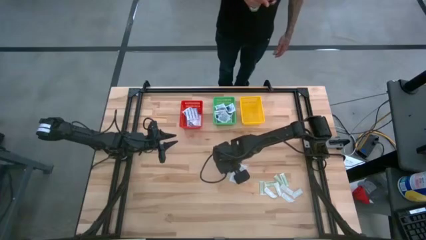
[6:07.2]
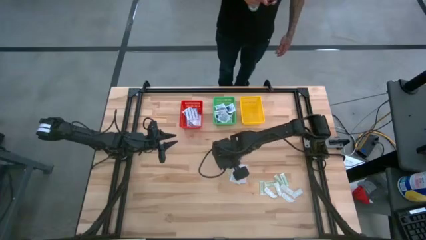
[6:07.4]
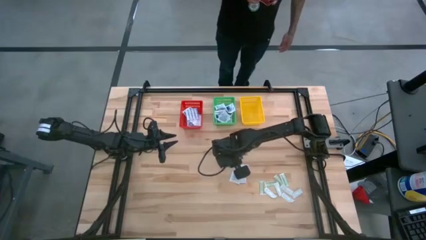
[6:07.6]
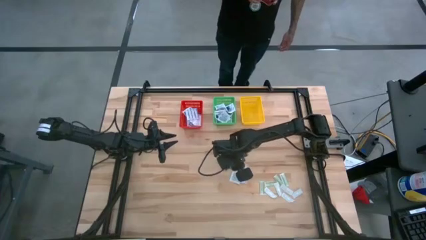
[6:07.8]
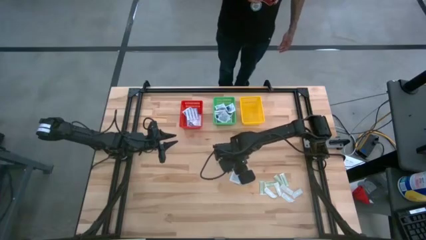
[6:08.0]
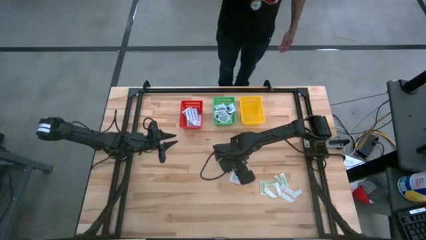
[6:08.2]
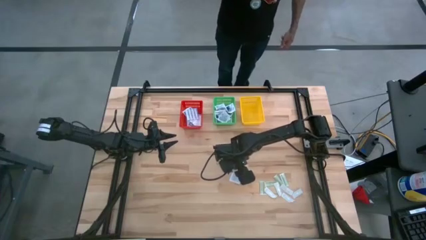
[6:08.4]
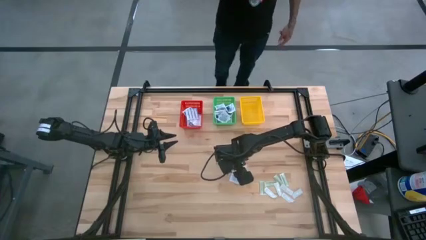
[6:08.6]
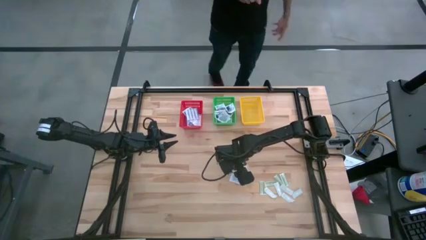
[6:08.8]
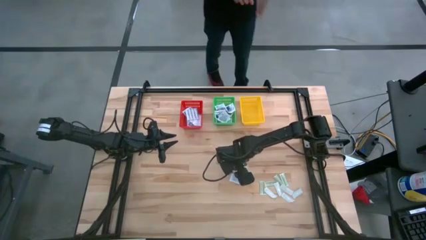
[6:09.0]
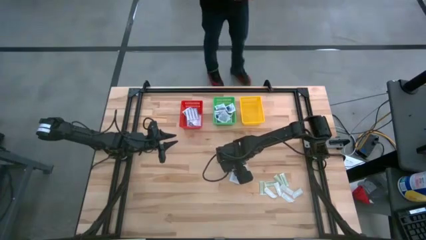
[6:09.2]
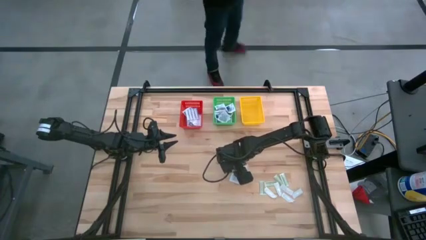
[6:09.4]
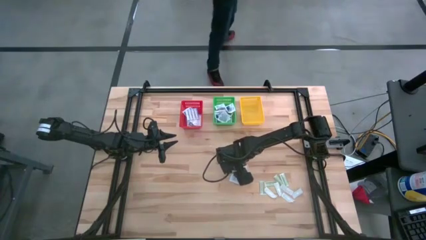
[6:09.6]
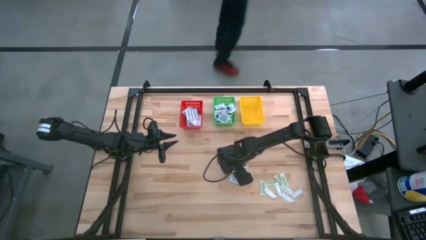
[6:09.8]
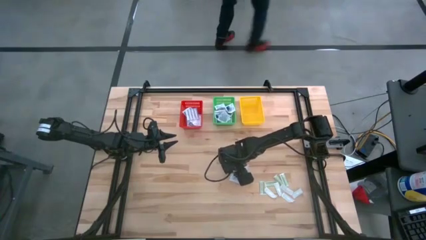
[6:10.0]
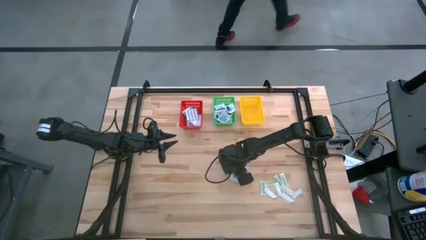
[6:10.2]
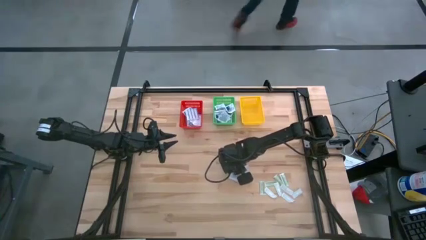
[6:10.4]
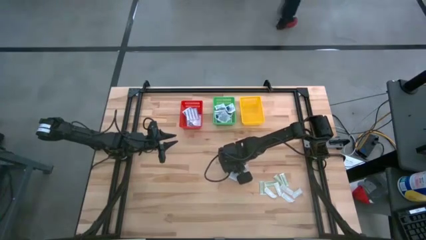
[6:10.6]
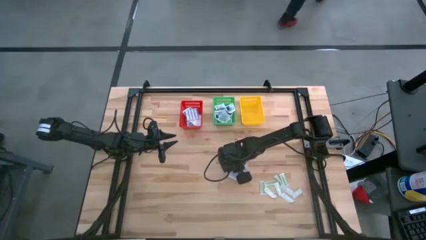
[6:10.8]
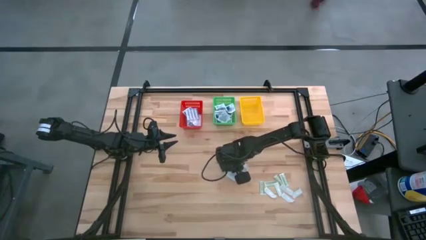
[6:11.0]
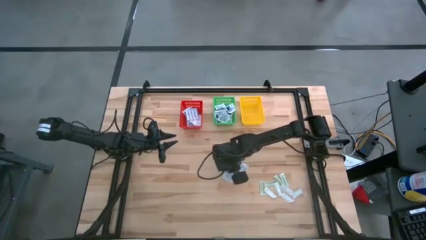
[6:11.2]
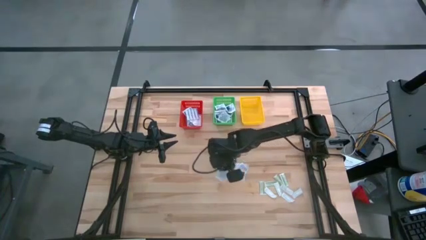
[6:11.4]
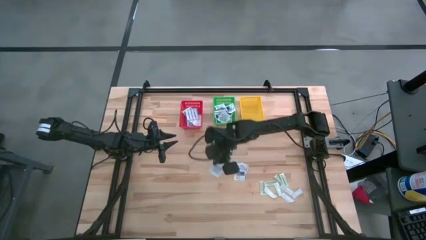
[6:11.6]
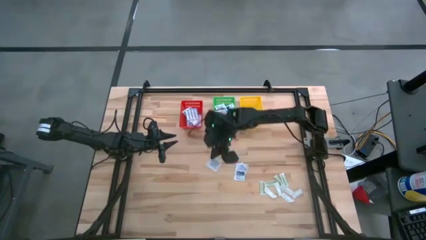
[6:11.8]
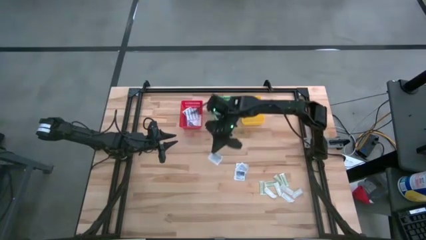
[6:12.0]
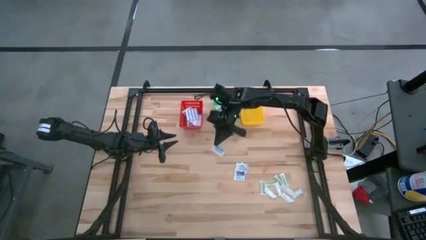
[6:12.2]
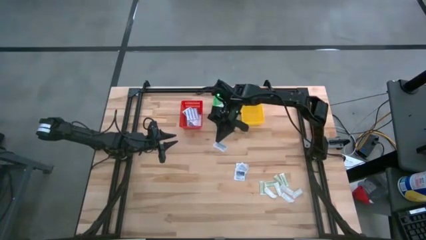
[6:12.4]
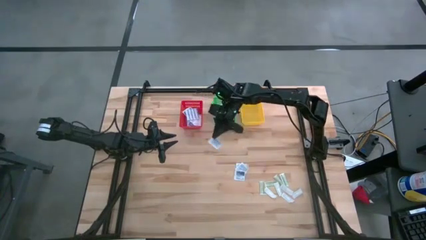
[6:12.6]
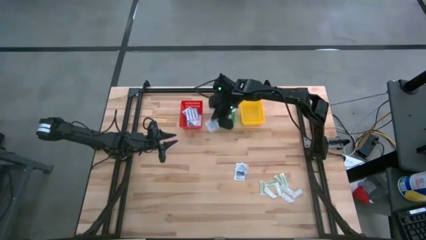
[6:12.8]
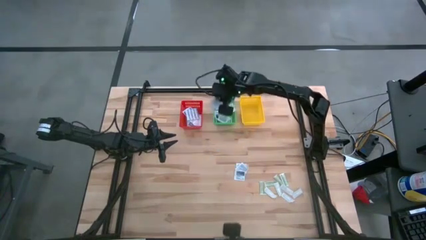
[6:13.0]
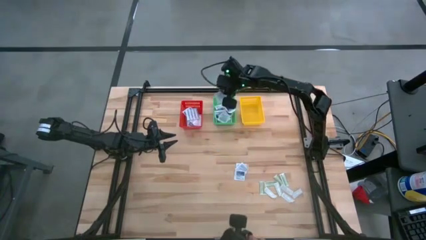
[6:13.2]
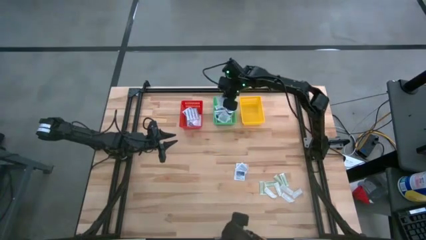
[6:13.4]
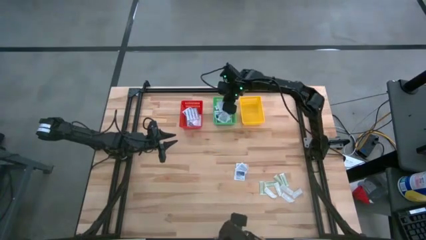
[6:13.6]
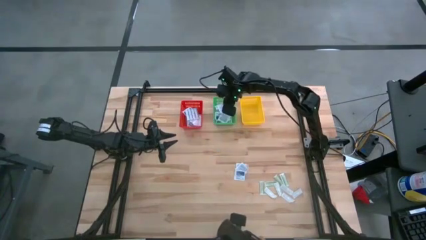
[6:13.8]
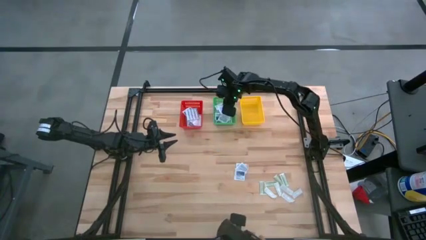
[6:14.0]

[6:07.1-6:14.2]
Task: Pick & Place First Aid Supplies
Put the alcohol pad into the green basket

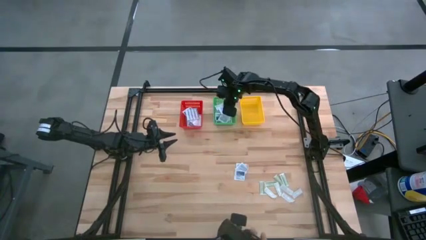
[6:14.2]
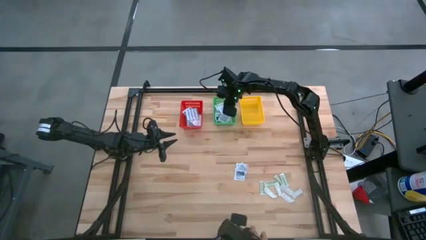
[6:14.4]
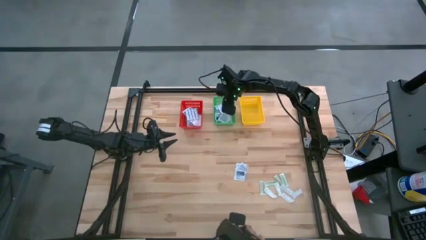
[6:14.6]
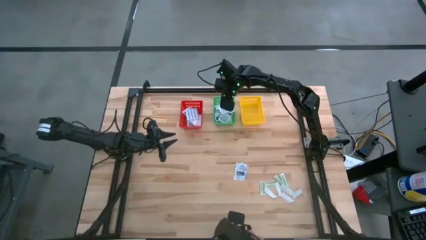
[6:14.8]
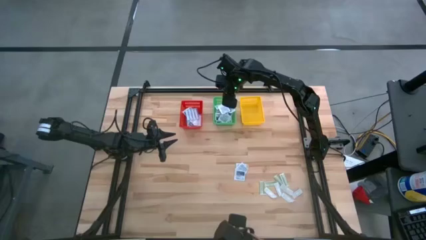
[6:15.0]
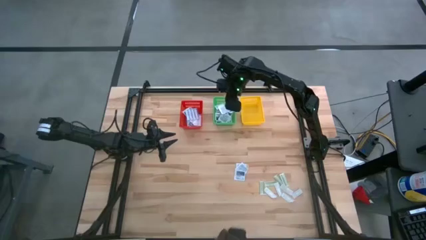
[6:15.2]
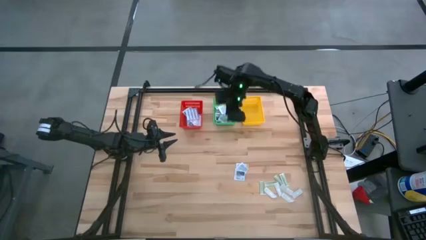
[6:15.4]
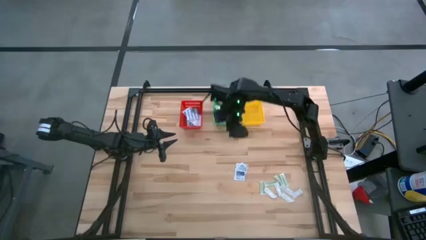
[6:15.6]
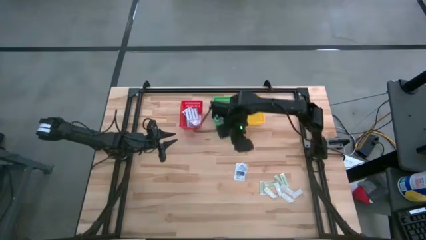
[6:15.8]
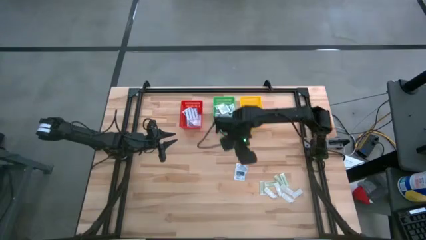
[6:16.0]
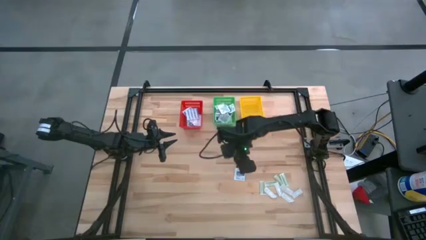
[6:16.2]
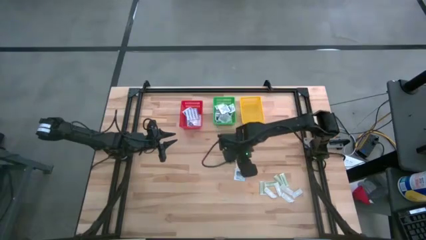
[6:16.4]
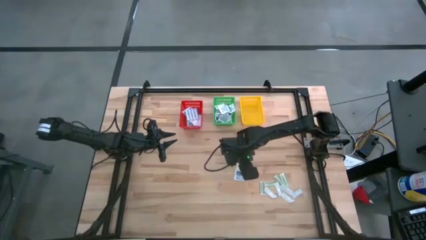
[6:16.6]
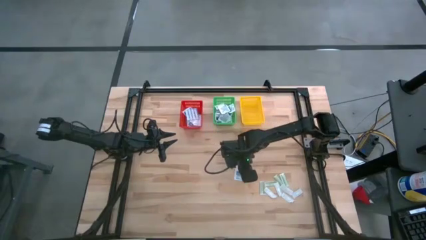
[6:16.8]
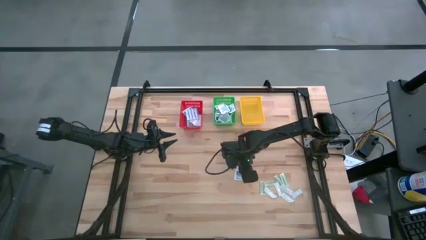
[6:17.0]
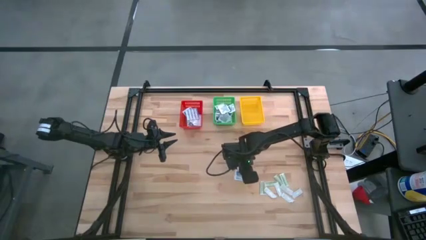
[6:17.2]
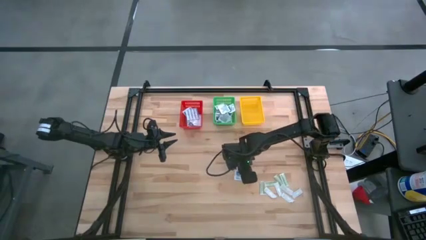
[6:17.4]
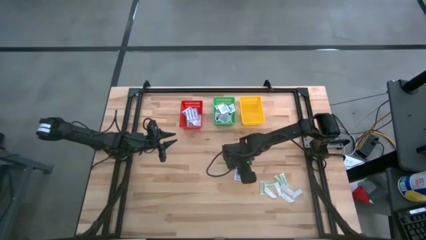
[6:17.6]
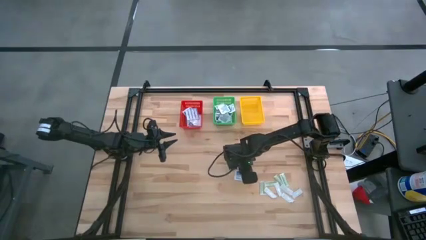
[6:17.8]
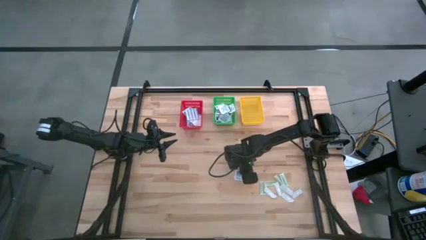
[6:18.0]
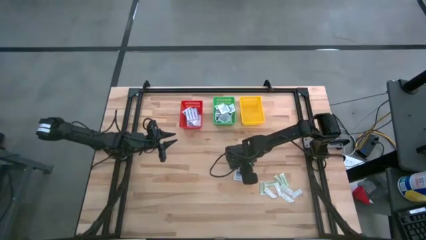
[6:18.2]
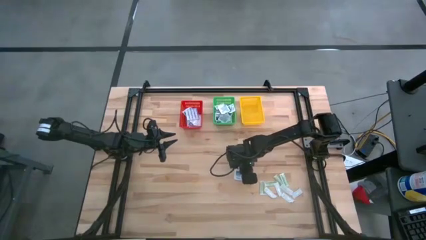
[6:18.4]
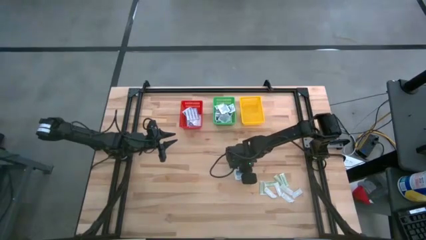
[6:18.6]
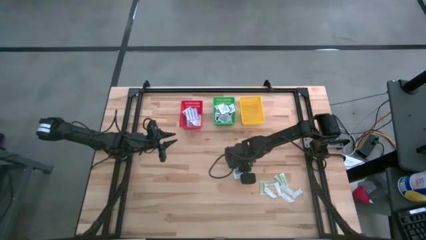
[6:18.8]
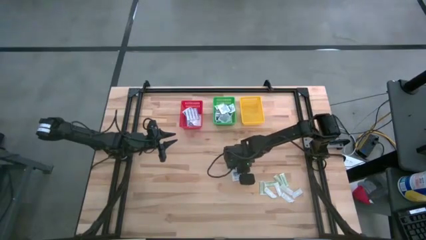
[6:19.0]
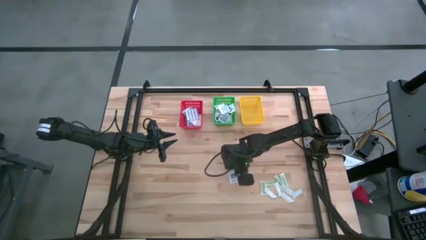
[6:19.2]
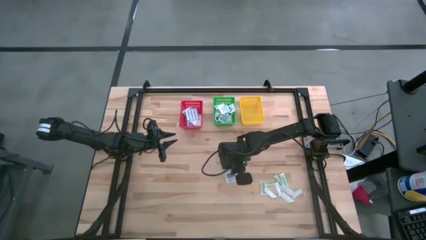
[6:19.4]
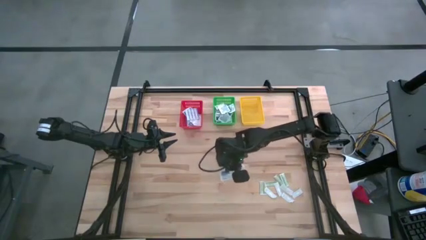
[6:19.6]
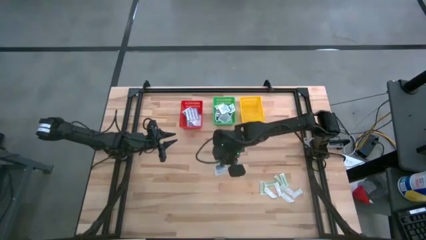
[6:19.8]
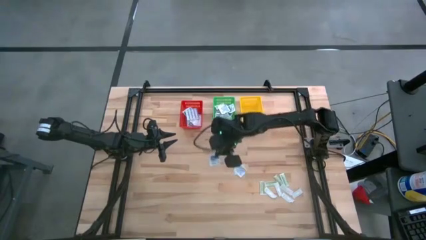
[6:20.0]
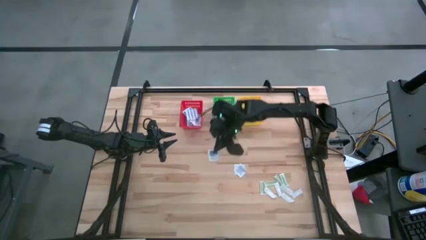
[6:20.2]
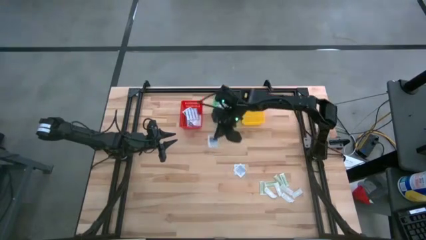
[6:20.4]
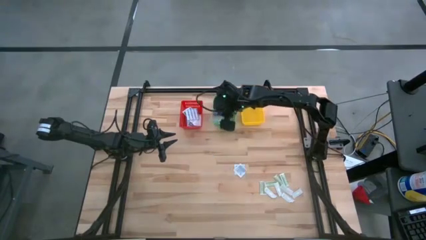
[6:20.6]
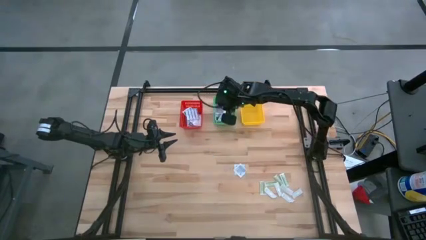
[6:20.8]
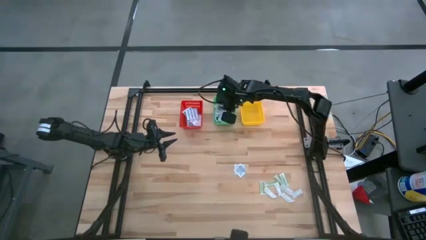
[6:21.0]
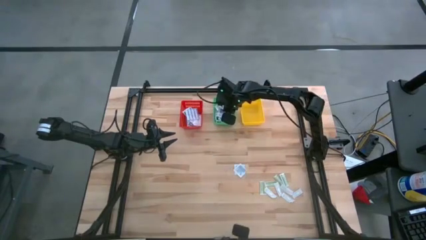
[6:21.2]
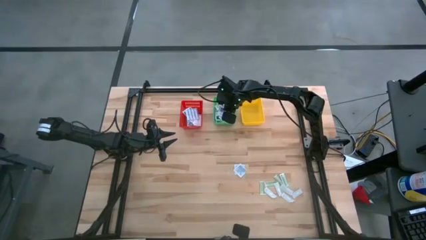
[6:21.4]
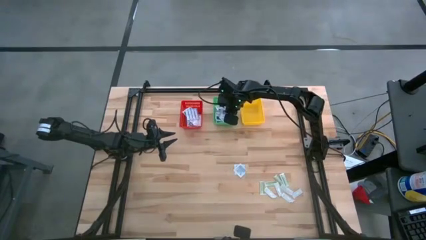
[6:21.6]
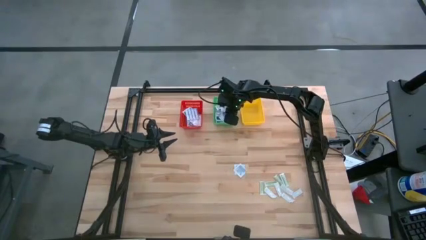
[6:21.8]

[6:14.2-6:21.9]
Put the alcohol pad into the green basket
